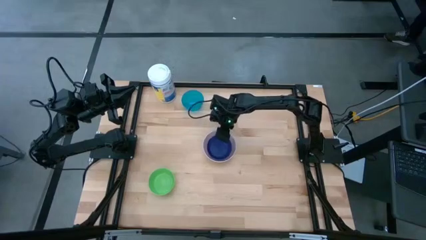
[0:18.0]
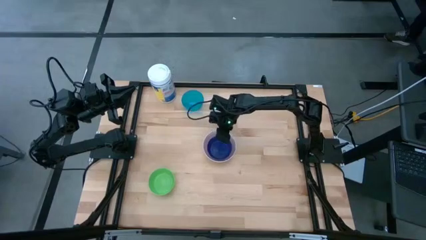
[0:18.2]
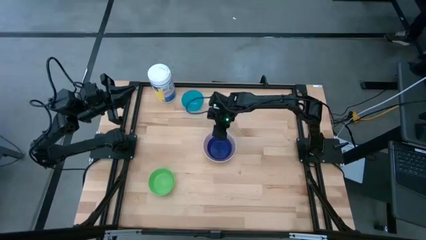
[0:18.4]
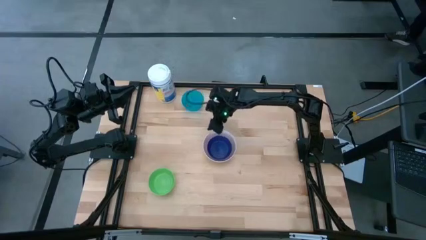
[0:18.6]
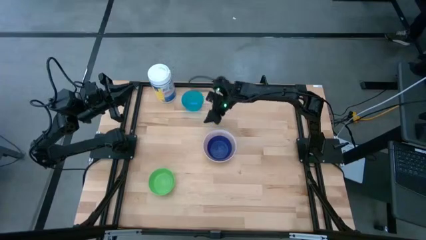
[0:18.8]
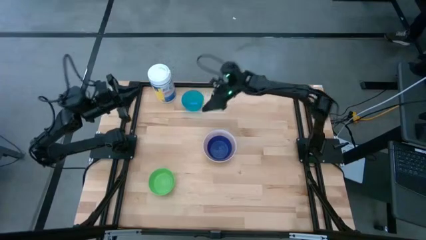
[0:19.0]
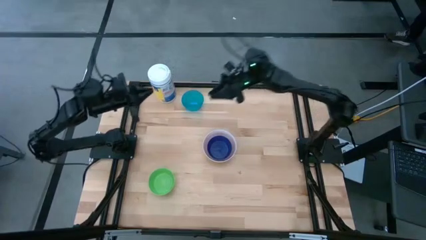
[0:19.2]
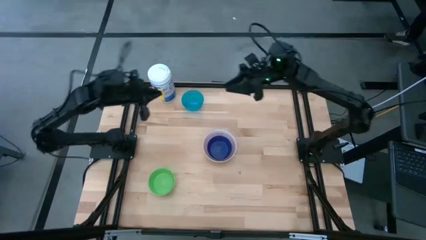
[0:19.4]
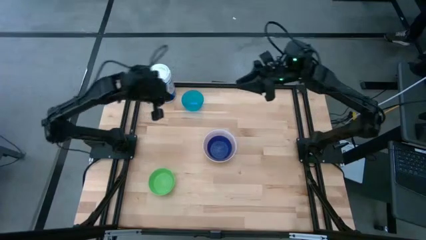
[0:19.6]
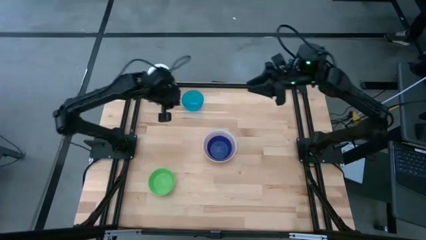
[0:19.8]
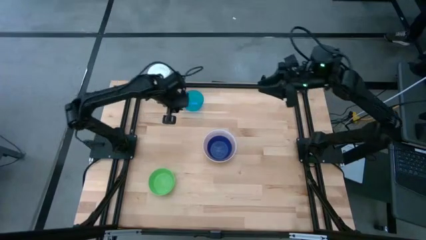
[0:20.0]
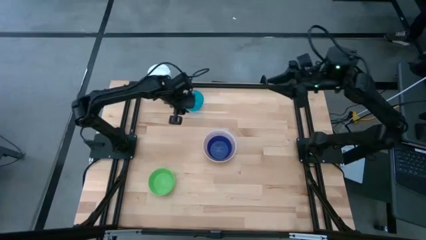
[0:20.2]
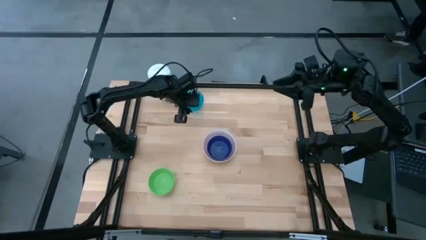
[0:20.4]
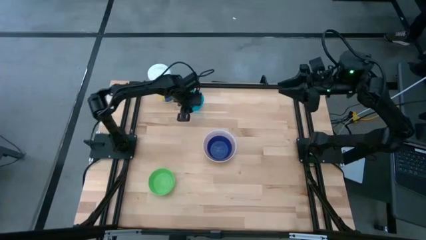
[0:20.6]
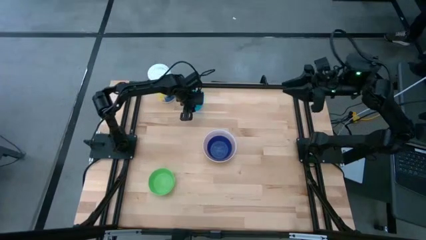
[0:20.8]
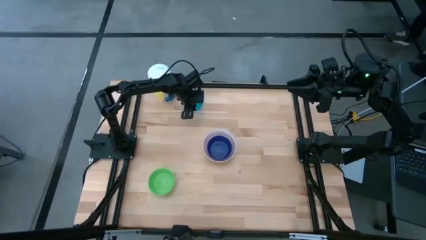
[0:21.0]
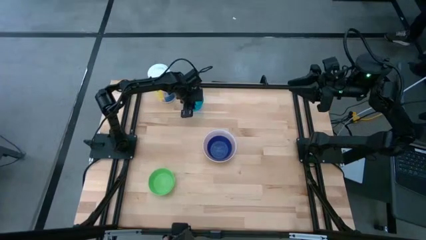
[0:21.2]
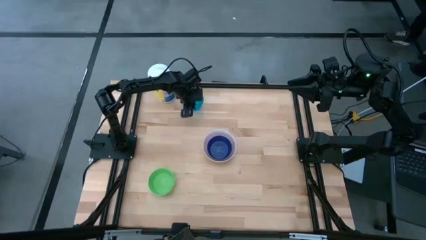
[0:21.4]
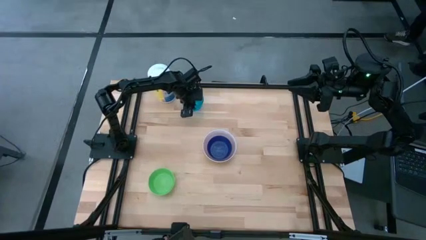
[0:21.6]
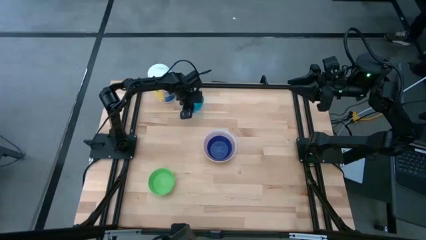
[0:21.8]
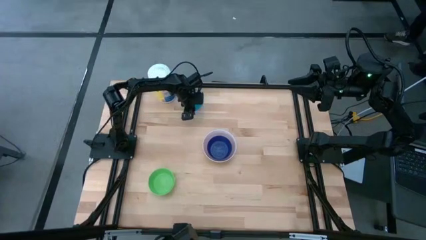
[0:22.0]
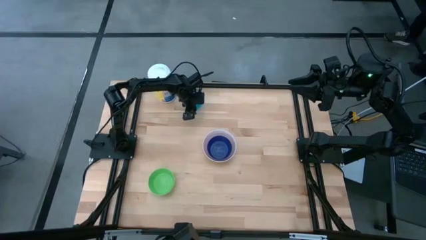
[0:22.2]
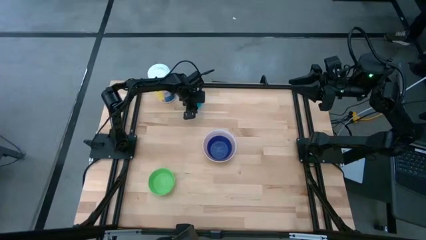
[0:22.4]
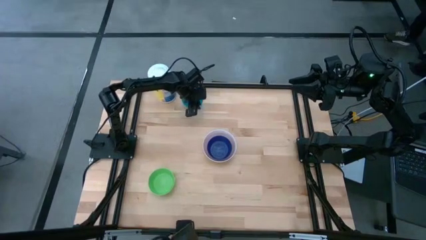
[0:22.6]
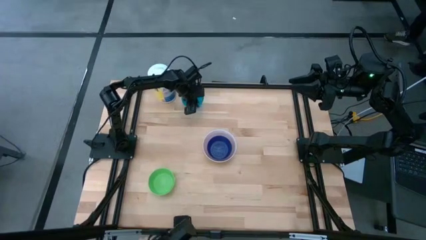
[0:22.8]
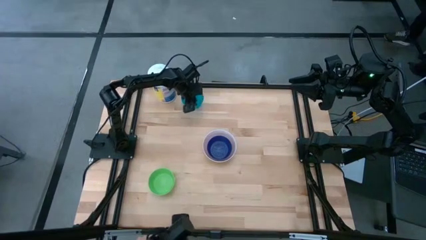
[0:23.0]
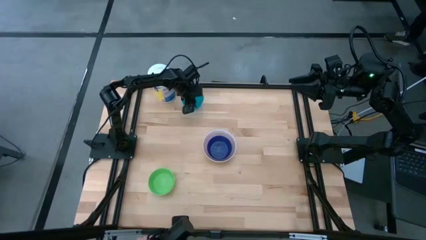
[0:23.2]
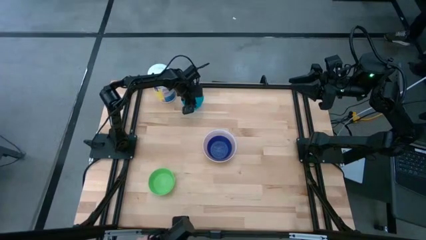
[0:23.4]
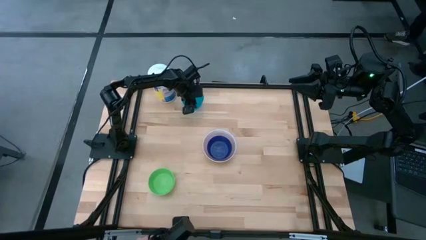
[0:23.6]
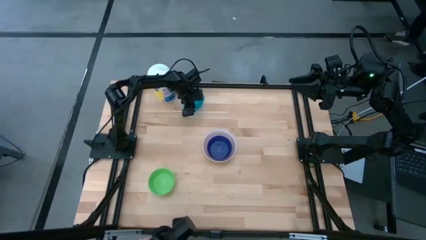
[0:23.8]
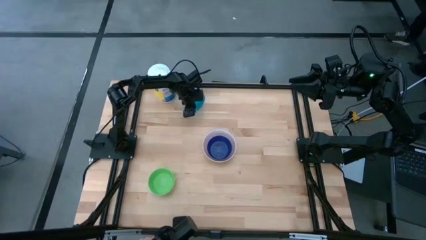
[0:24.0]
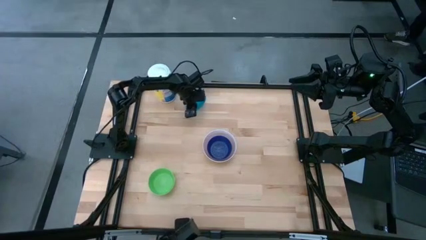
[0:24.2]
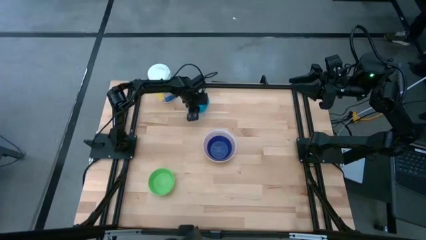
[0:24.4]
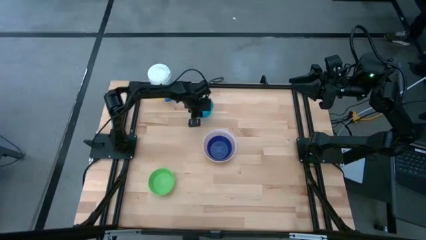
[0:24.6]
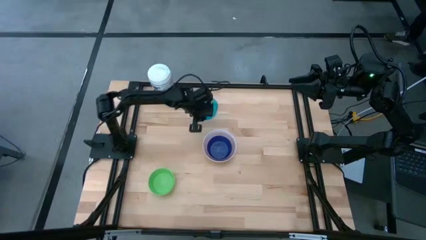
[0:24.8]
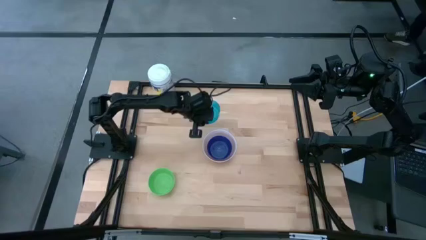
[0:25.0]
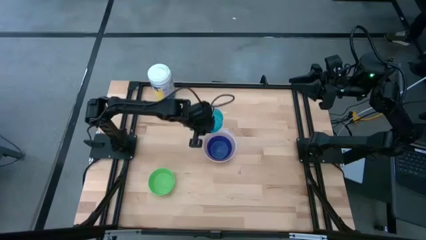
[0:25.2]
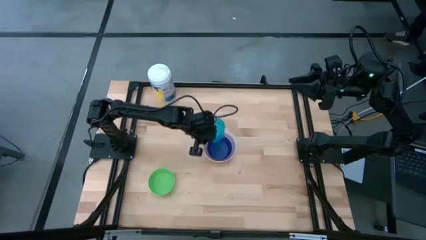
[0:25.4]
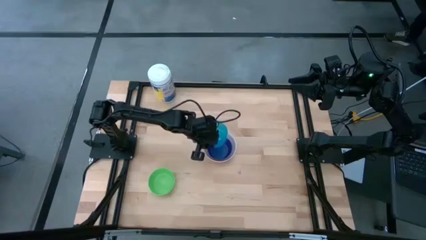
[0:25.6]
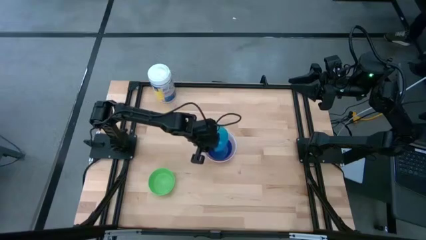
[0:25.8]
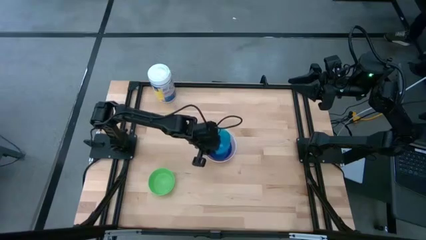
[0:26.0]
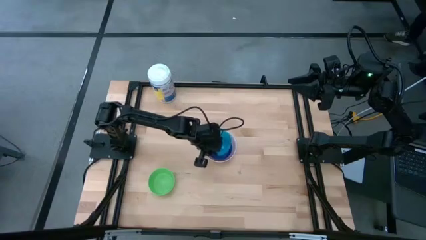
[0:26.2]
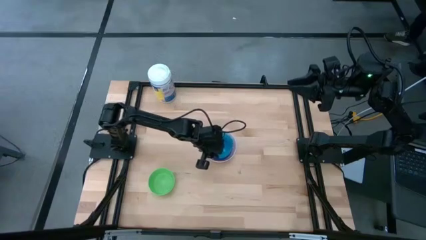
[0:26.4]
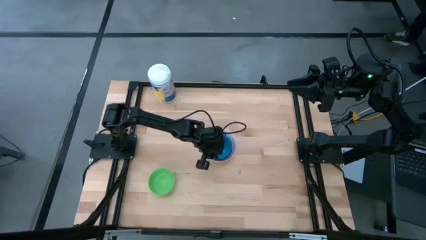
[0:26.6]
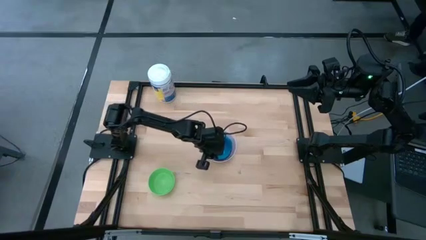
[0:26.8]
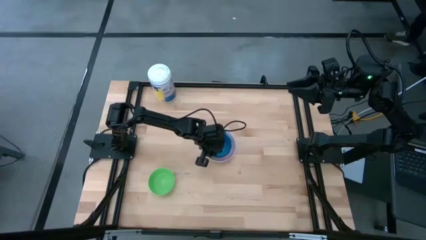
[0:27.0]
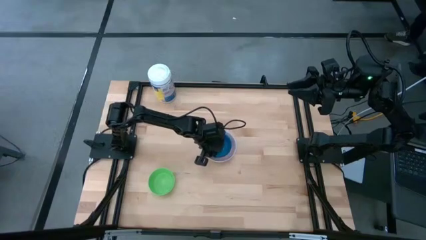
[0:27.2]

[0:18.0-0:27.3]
Stack the light blue bowl in the blue bowl

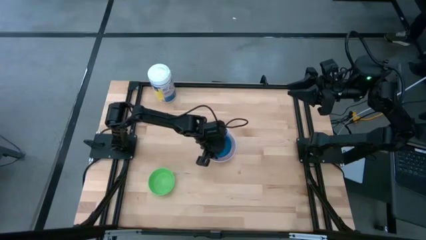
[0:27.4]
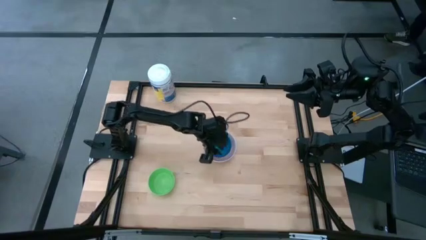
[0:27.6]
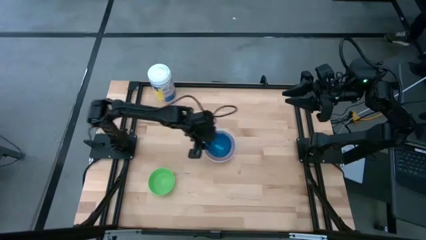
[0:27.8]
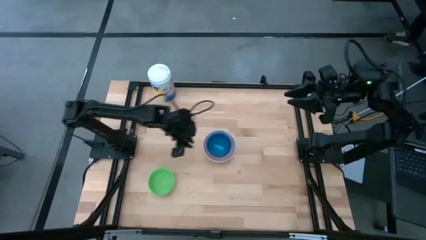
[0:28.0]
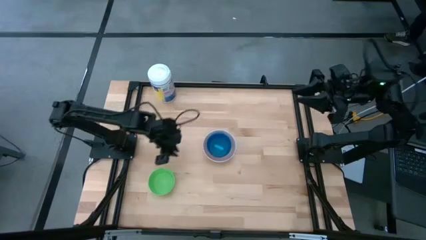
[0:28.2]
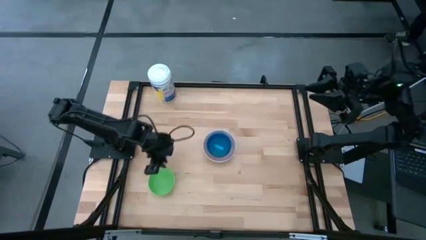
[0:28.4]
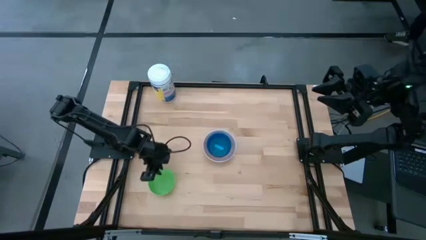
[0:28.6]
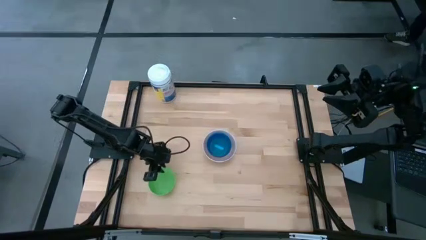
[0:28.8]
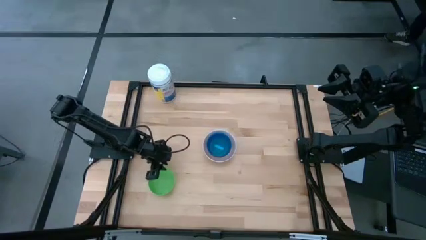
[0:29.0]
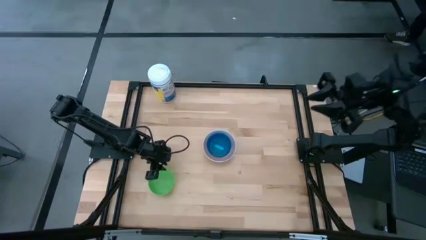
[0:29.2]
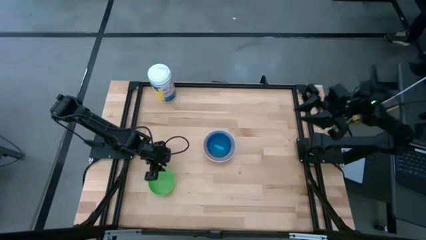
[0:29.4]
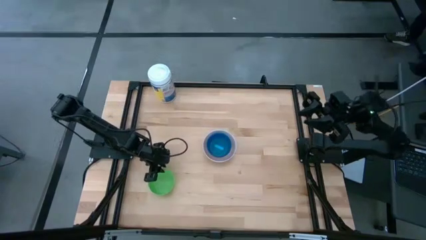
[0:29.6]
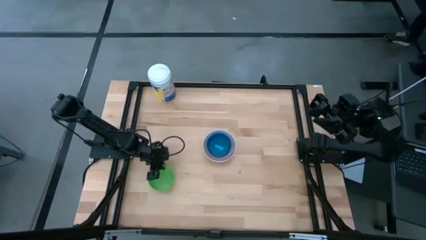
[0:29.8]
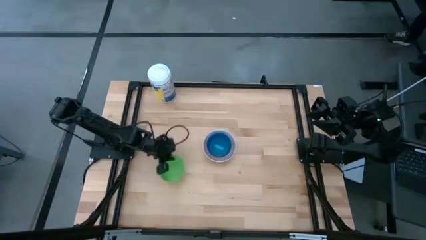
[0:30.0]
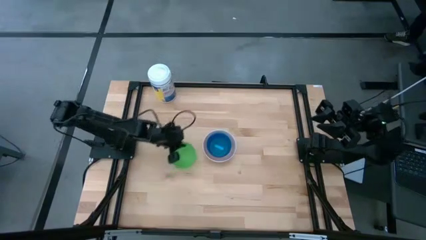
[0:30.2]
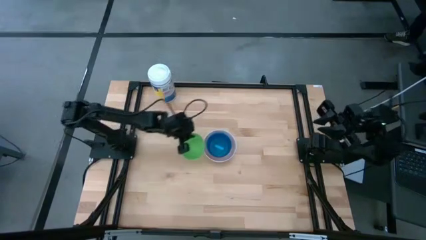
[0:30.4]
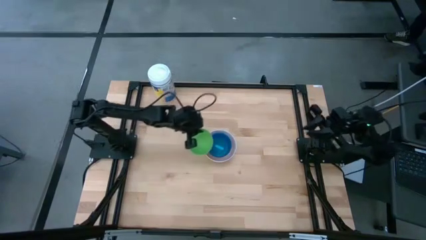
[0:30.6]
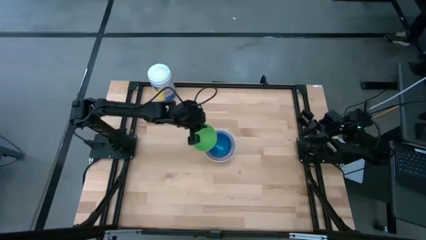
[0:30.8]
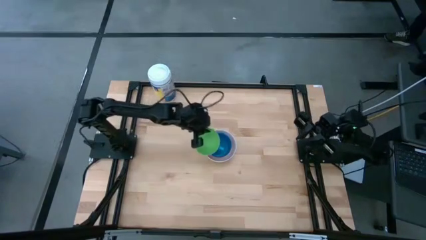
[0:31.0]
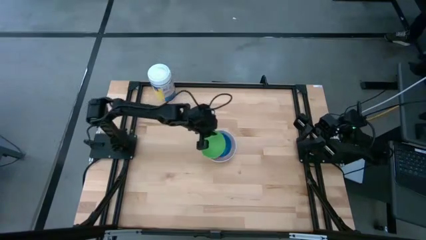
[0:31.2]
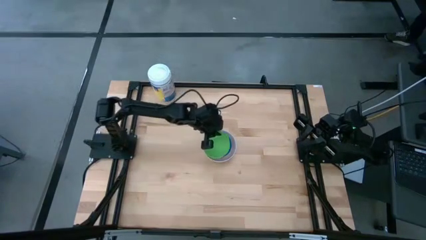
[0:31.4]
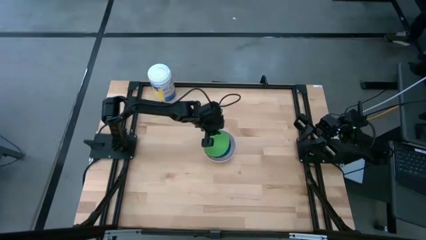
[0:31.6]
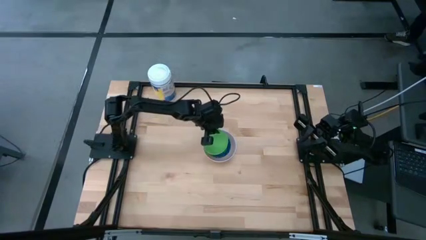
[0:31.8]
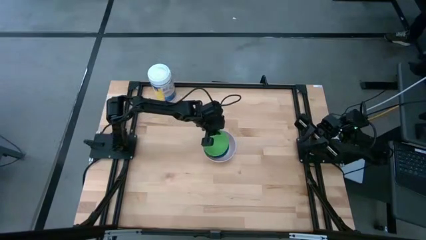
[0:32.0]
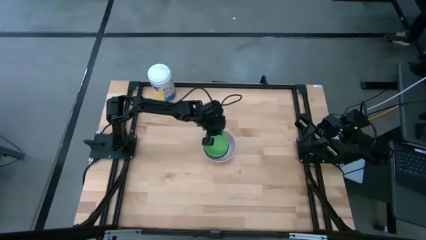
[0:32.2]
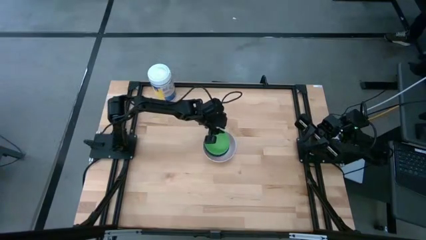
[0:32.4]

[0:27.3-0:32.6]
Stack the green bowl in the light blue bowl

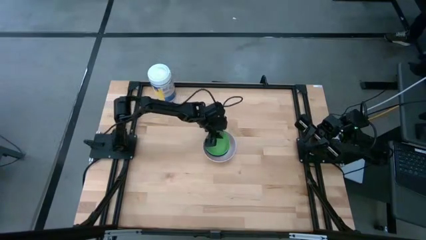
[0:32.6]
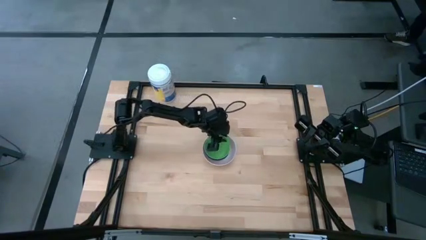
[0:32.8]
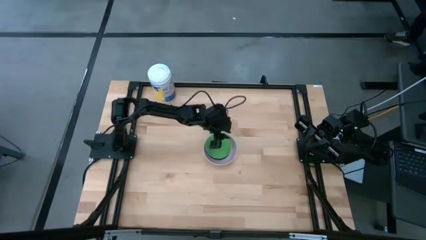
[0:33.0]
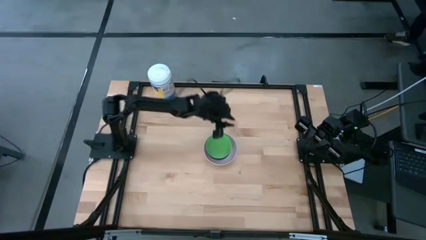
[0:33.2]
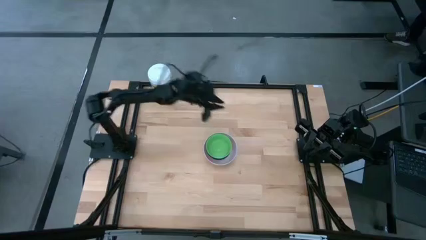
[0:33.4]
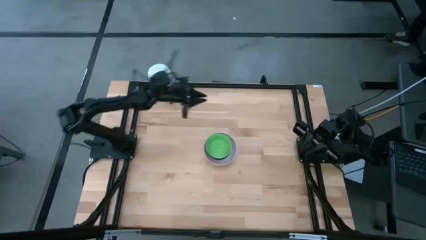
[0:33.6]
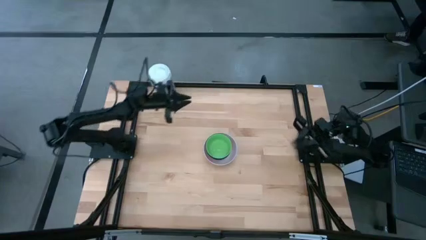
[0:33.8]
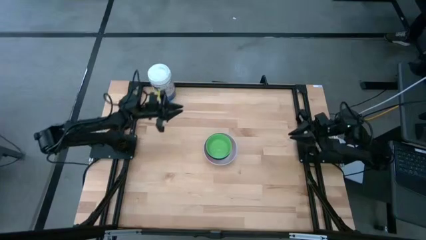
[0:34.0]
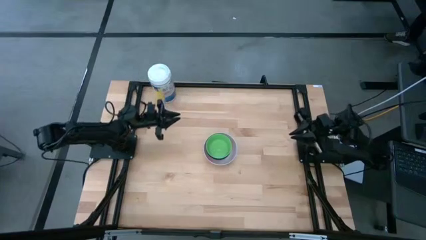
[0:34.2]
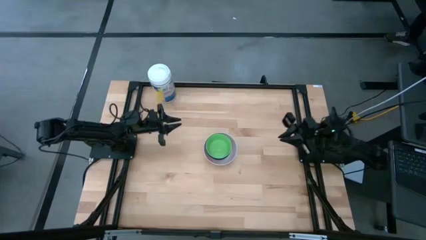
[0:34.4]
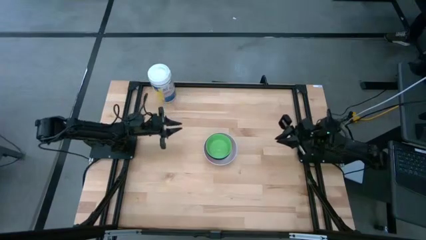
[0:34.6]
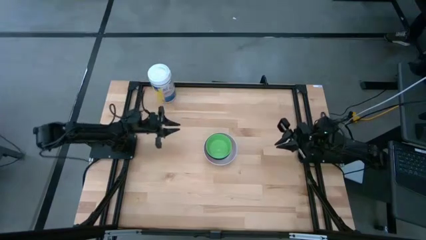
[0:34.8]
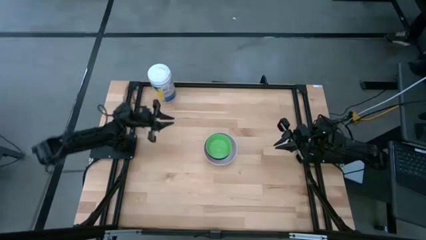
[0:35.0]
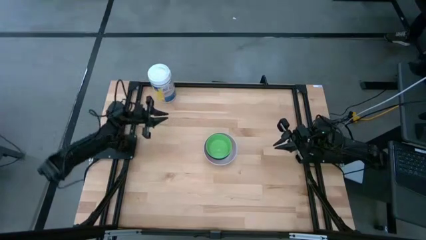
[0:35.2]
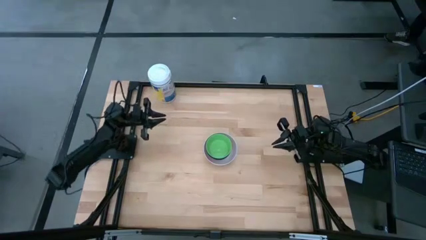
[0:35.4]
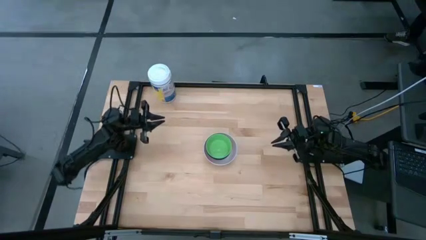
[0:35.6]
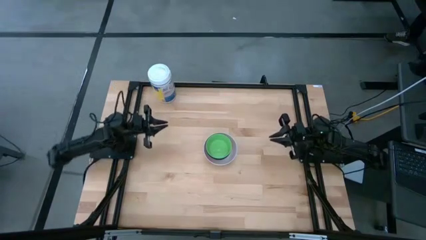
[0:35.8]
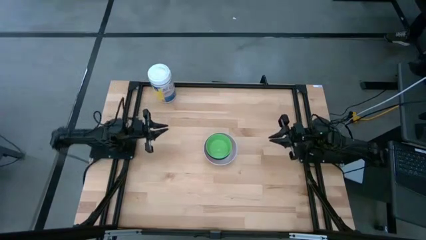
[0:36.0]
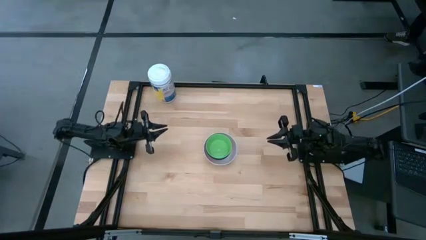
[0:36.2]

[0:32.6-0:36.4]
Return to Home Position
